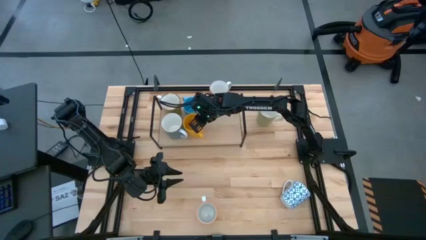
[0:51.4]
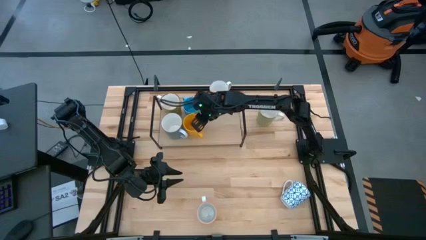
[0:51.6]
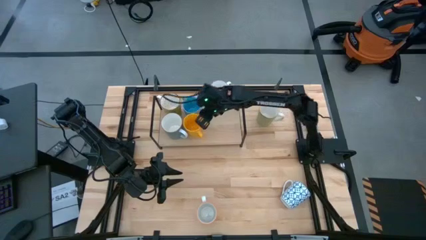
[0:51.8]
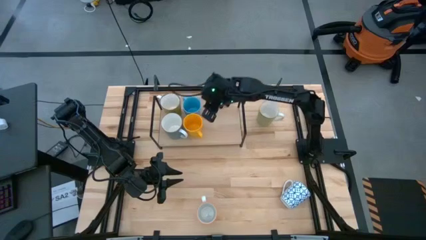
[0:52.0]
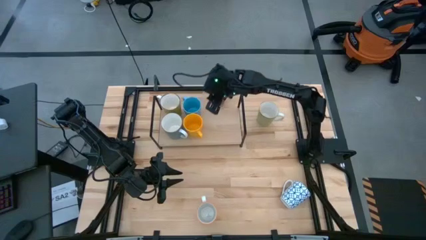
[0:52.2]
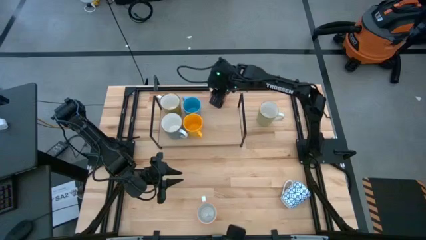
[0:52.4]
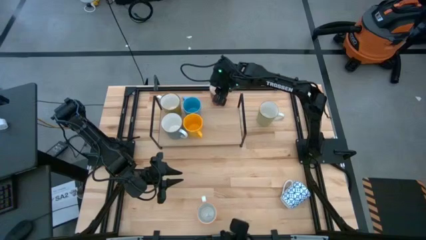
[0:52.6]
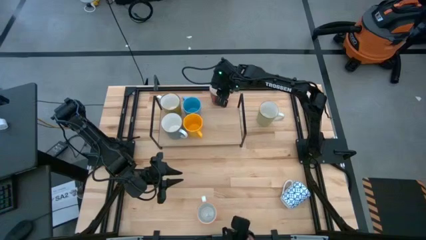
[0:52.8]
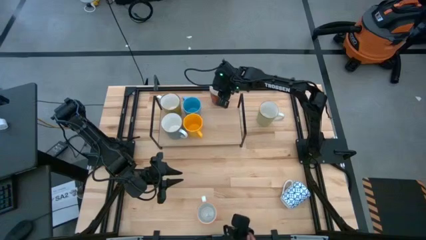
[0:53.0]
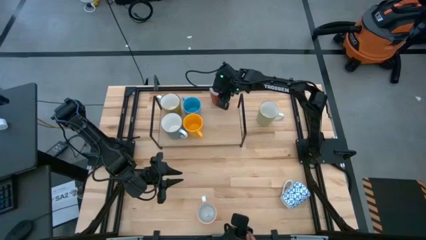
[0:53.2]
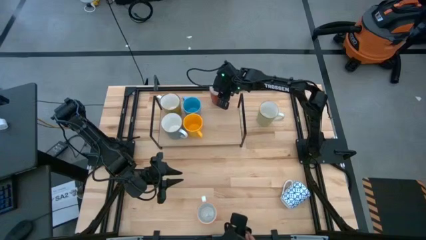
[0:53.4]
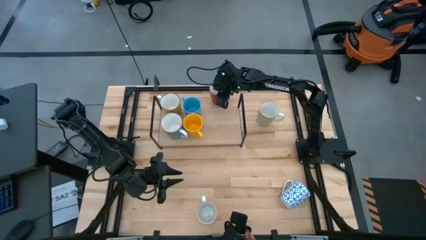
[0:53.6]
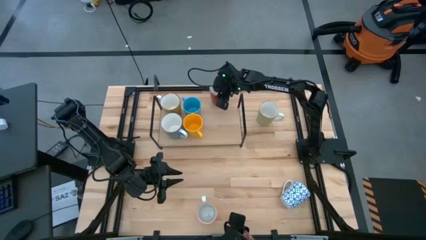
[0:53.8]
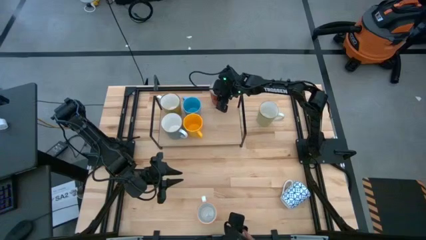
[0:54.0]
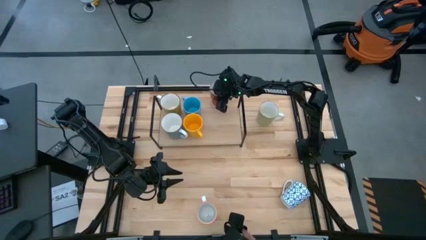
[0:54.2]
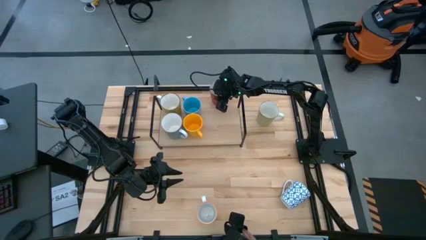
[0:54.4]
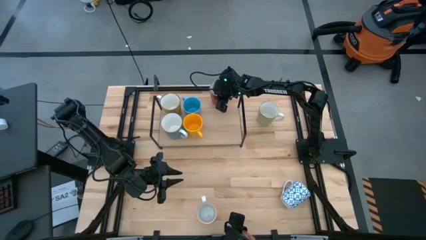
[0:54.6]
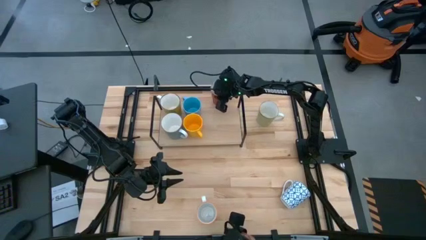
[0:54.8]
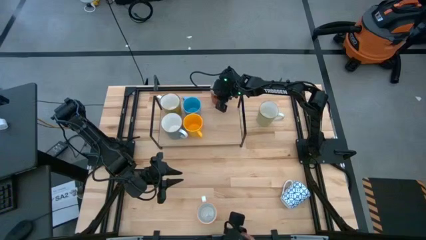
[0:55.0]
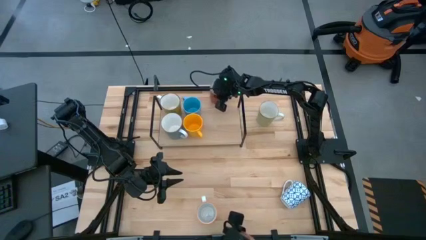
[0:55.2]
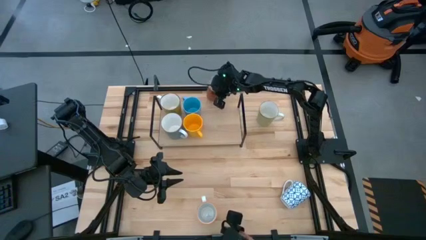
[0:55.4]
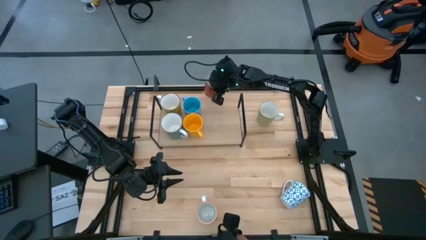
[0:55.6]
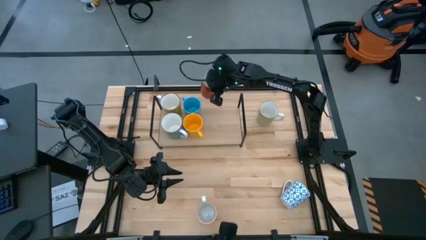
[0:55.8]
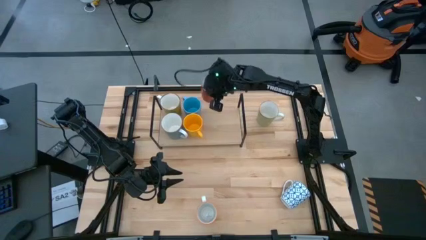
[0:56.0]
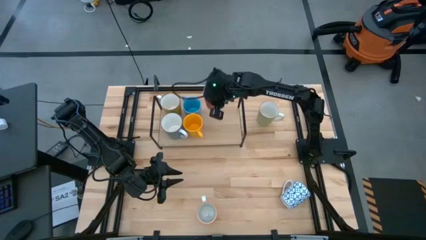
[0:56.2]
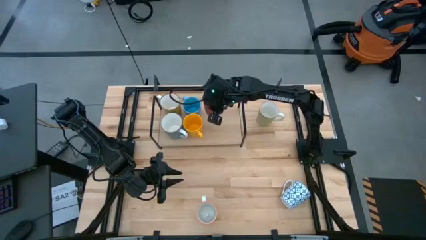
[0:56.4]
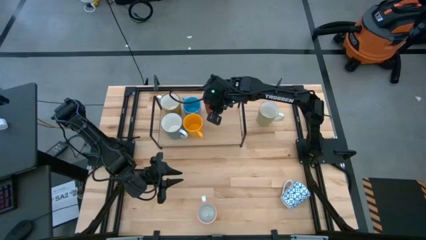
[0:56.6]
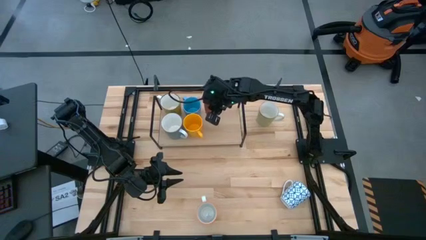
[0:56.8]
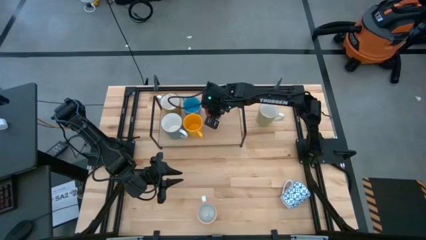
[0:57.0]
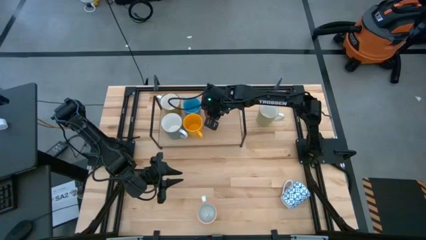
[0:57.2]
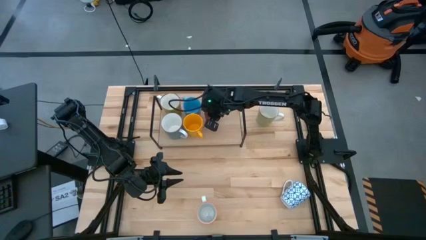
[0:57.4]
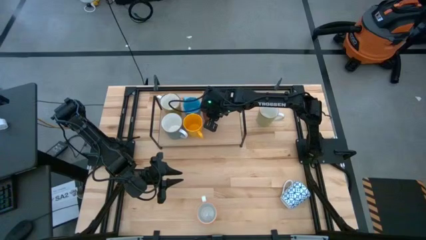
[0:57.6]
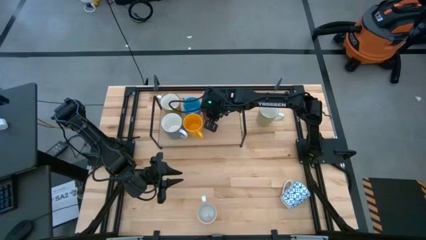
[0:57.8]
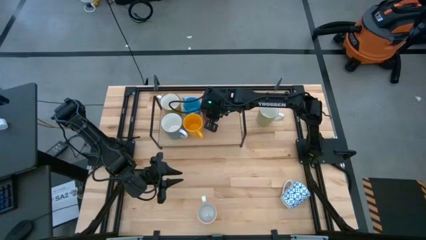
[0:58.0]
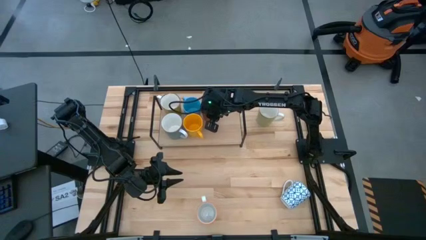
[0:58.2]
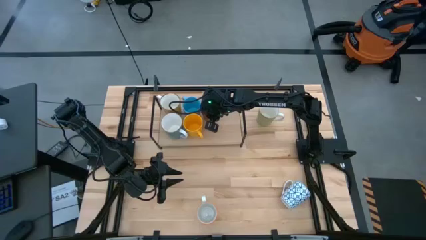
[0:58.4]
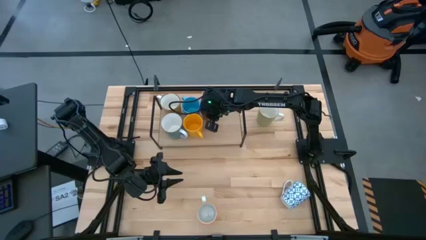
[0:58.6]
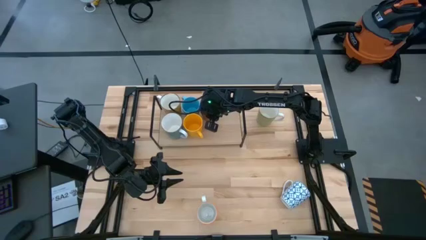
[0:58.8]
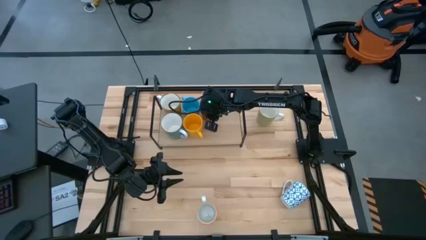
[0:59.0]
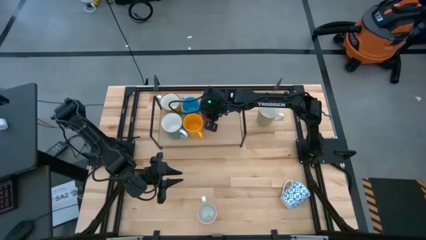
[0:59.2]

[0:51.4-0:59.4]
Task: Place coffee mugs
Put the red mug on the shelf

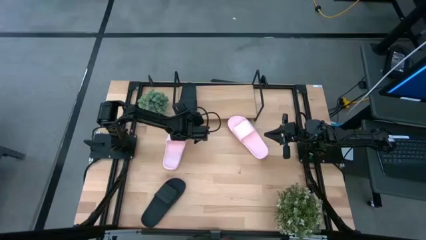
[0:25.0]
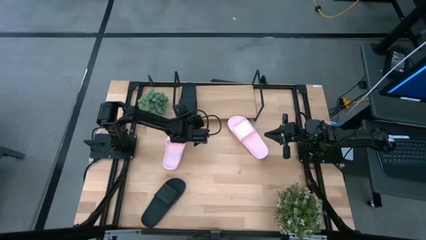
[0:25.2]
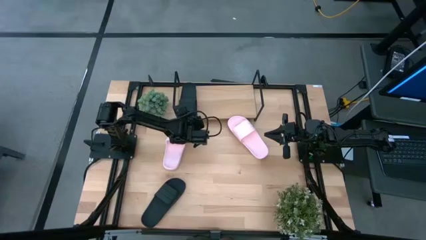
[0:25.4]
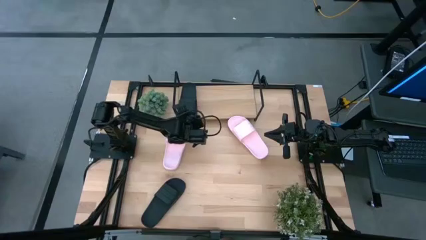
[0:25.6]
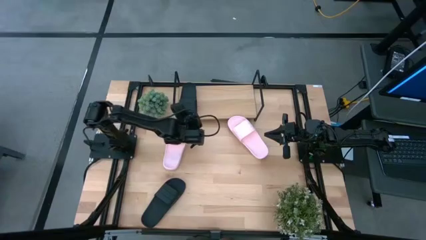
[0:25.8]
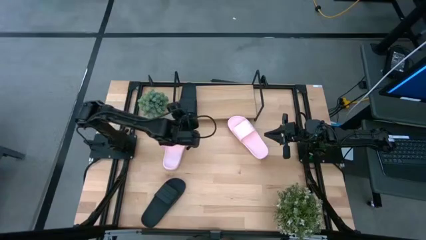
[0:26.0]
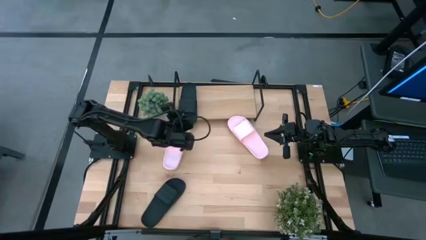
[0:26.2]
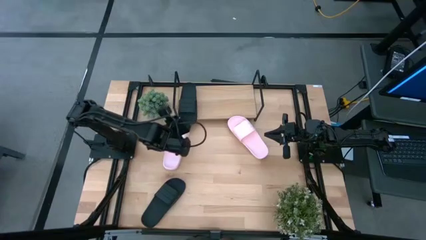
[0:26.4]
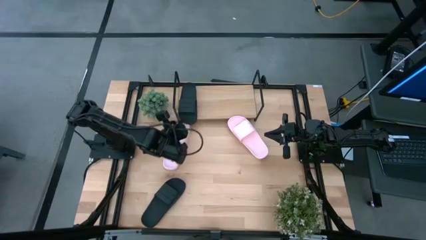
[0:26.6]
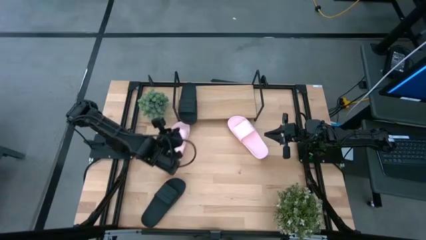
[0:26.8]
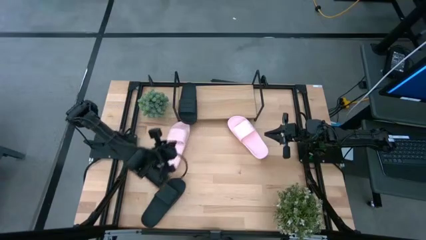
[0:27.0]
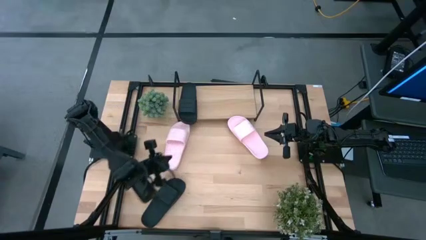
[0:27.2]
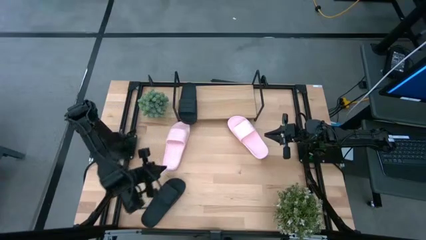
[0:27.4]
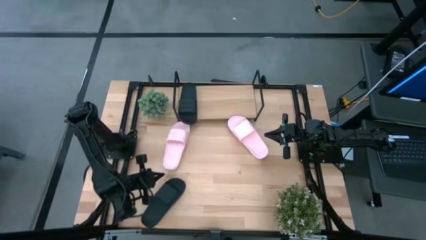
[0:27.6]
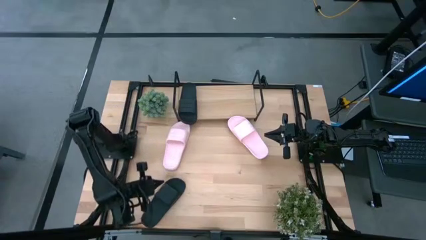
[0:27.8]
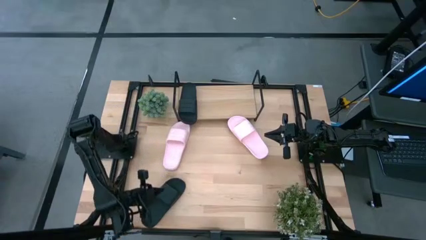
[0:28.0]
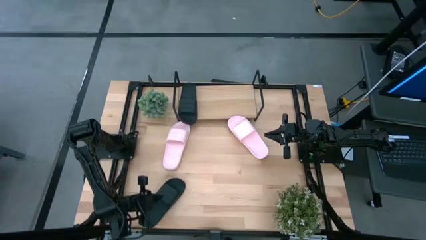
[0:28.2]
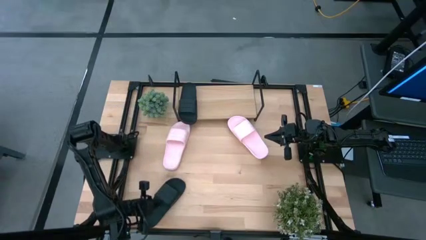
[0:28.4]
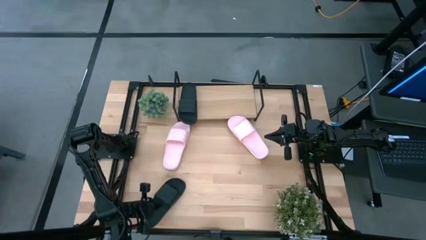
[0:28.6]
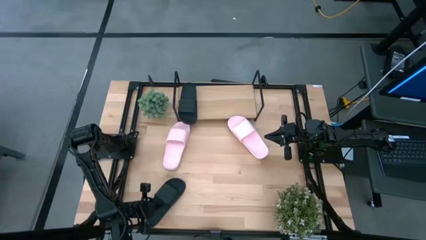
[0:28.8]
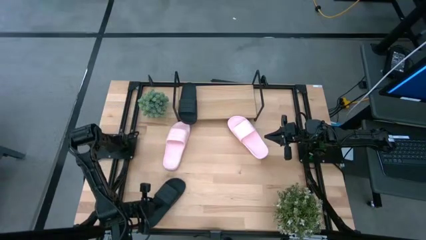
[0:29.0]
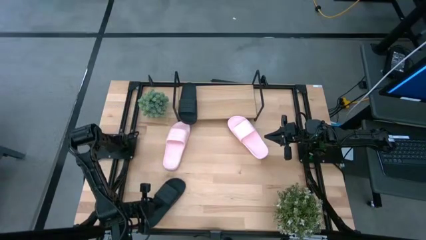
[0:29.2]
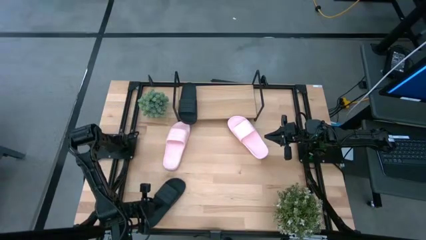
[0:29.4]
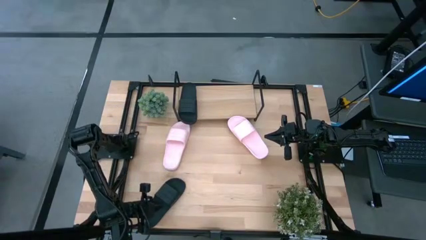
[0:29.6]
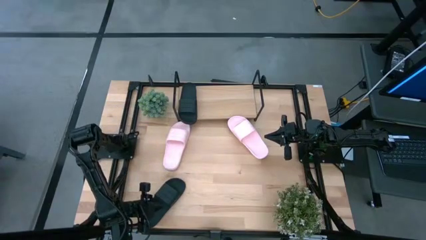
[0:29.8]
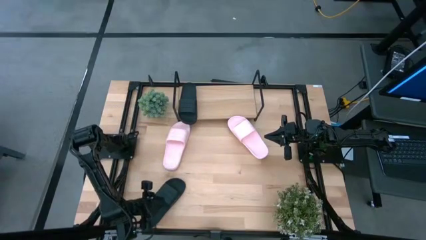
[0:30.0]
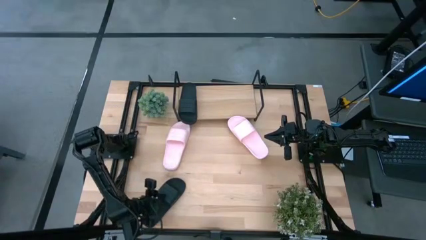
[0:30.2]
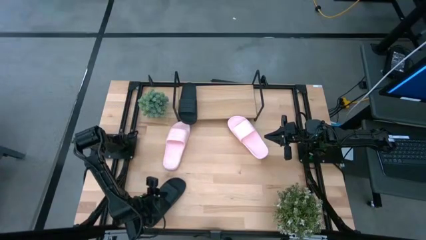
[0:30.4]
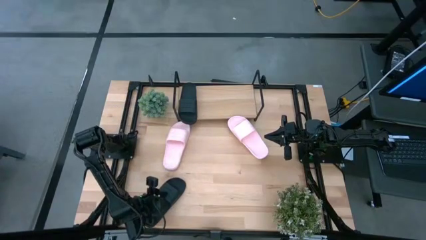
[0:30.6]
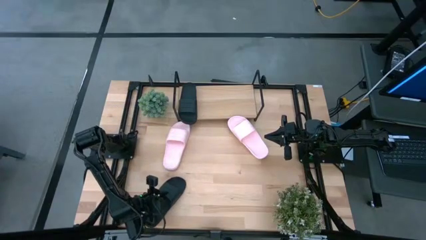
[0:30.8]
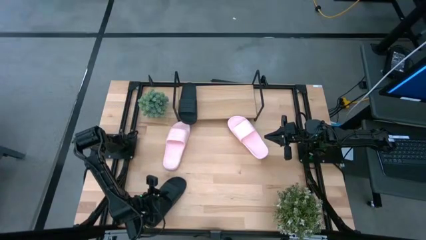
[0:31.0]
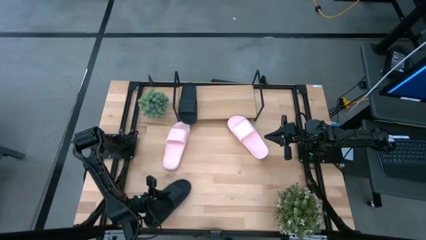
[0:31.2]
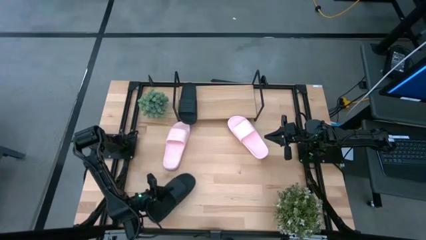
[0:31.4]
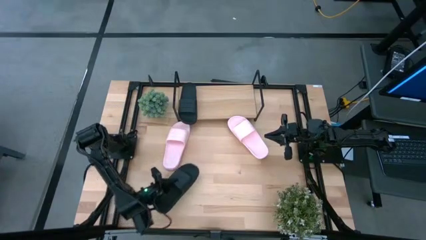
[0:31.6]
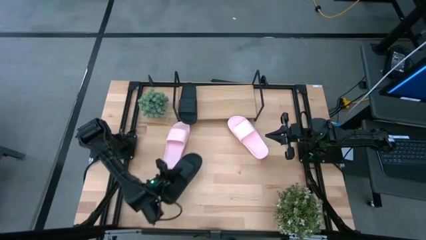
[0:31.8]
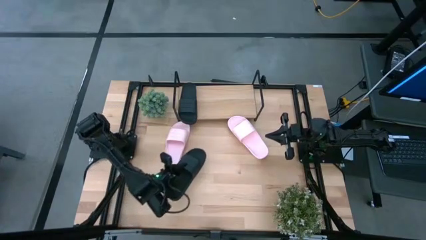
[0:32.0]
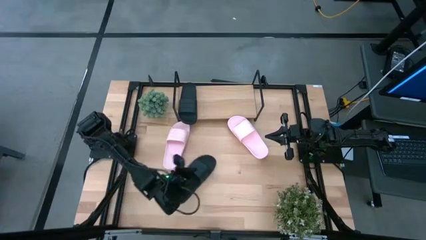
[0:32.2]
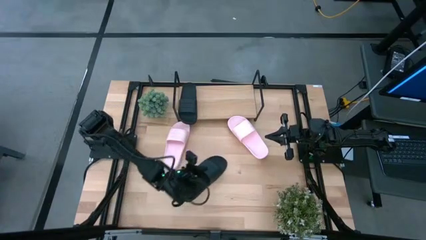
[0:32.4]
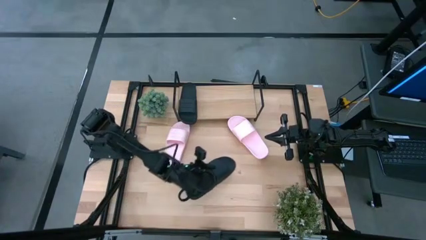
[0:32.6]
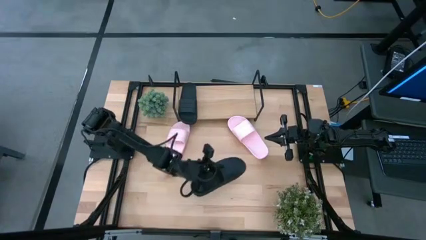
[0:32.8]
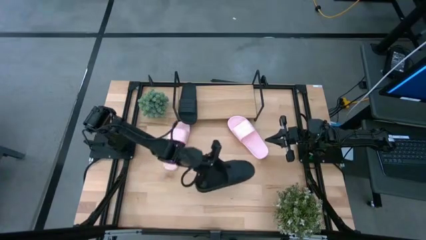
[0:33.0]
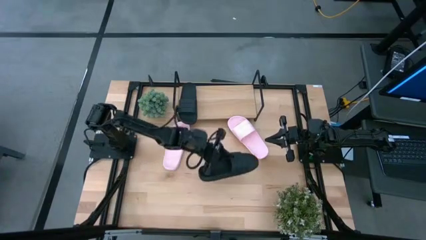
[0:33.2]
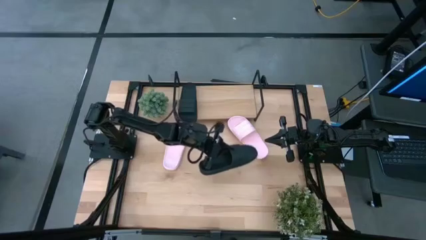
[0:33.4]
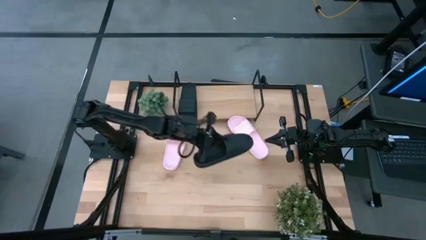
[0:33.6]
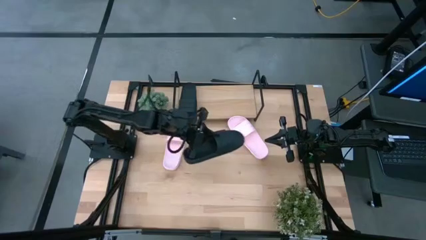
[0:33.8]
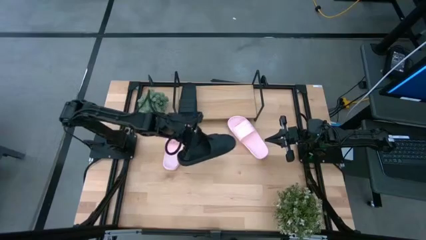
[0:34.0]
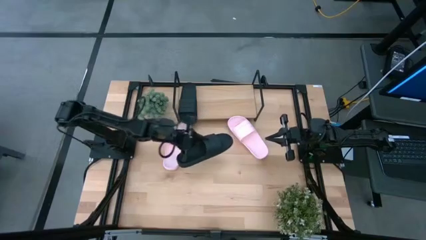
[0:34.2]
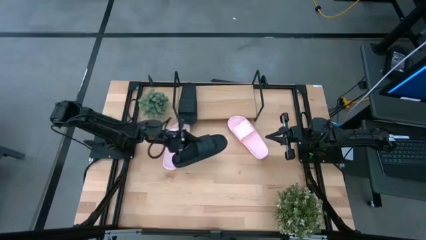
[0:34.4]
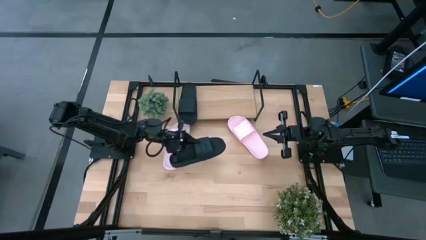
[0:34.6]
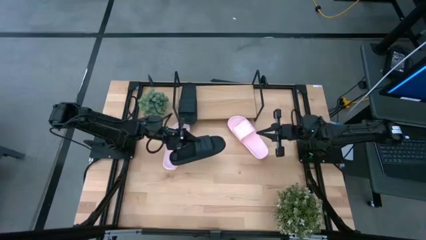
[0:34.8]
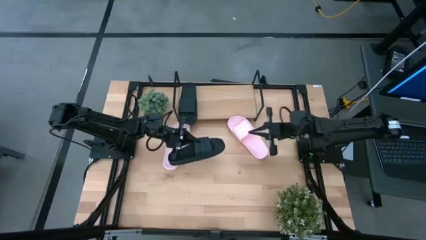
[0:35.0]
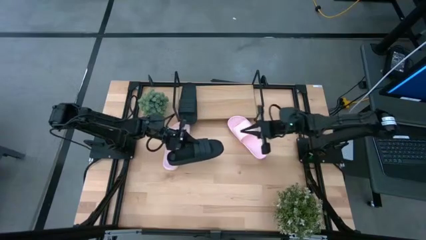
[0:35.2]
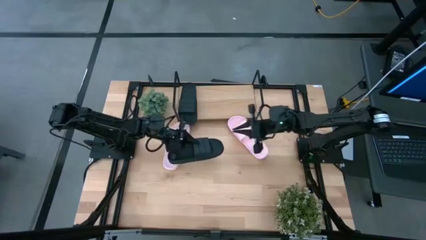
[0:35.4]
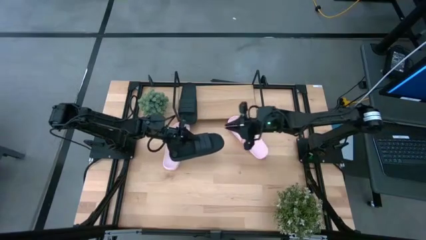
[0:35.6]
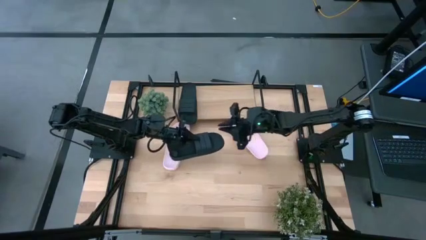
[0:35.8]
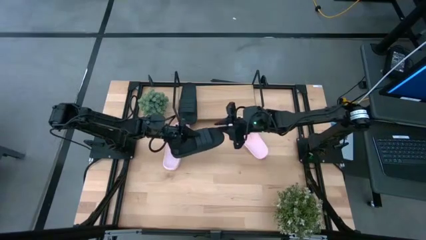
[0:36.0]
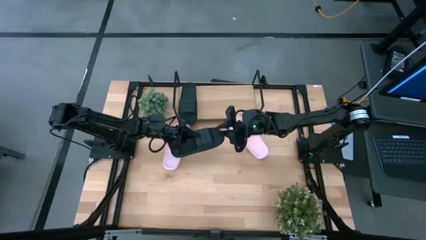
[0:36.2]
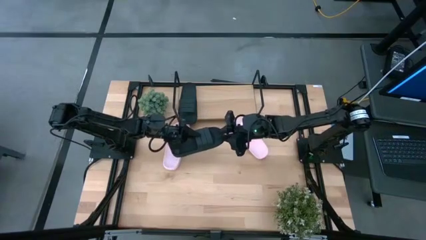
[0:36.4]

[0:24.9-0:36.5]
Task: Pick and place slides into the shelf
Put the black slide on the shelf
